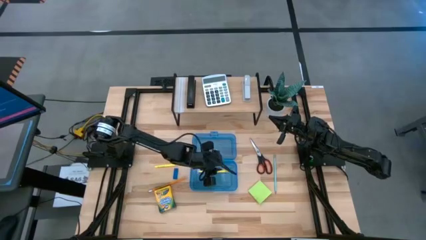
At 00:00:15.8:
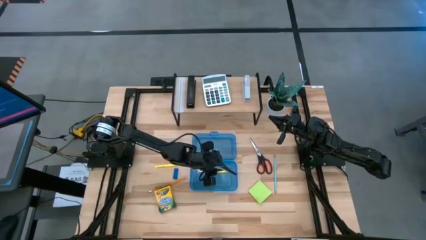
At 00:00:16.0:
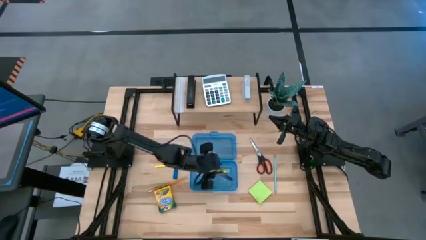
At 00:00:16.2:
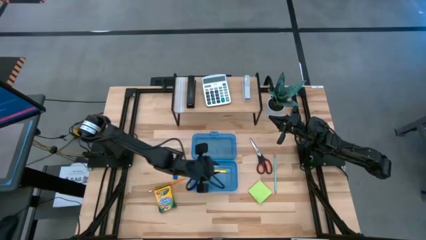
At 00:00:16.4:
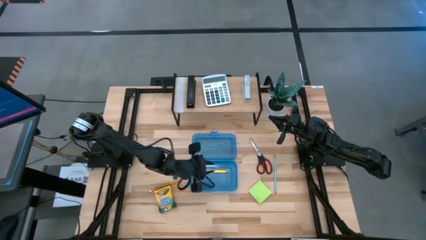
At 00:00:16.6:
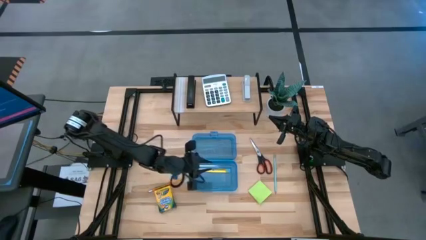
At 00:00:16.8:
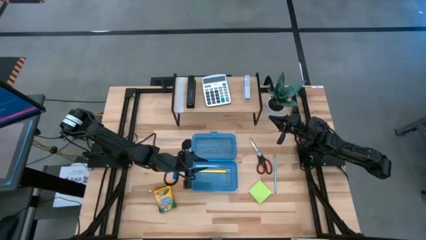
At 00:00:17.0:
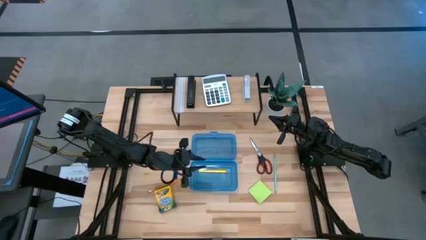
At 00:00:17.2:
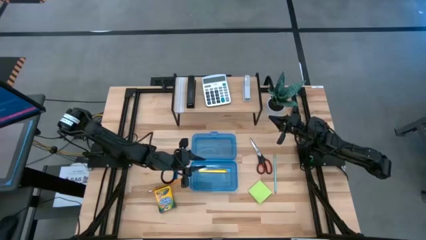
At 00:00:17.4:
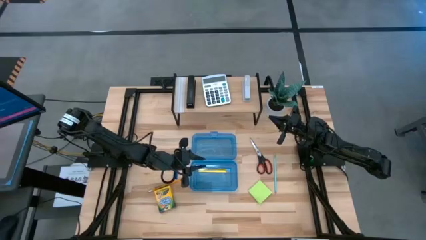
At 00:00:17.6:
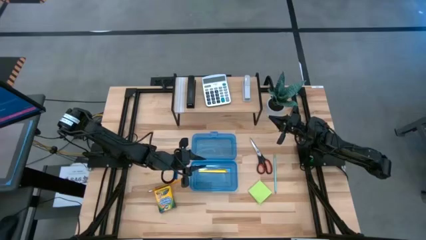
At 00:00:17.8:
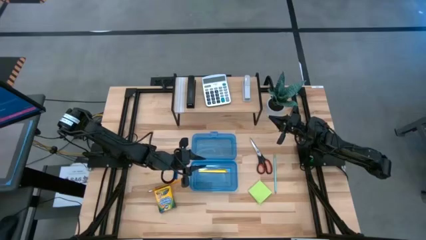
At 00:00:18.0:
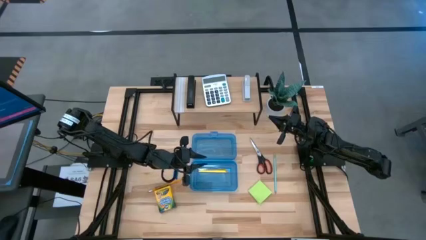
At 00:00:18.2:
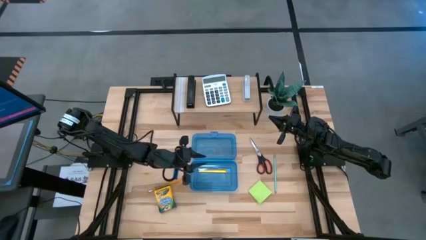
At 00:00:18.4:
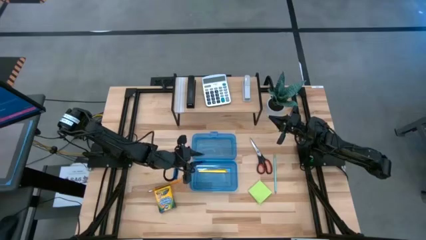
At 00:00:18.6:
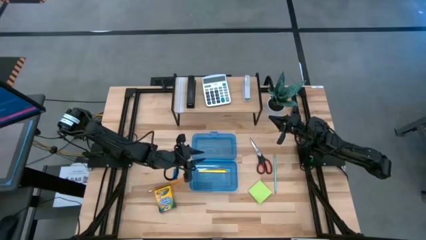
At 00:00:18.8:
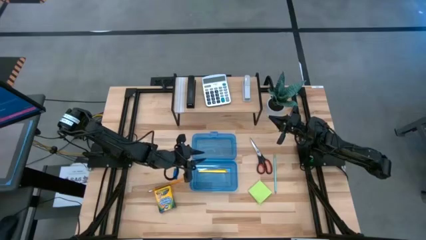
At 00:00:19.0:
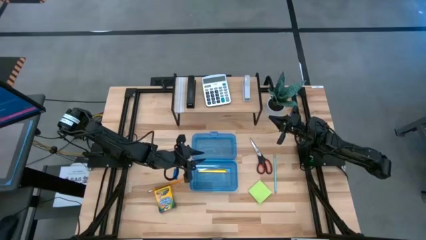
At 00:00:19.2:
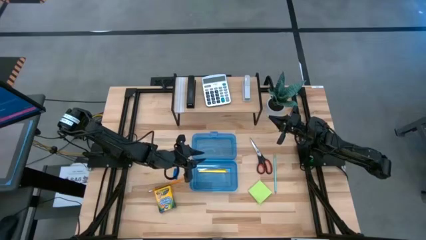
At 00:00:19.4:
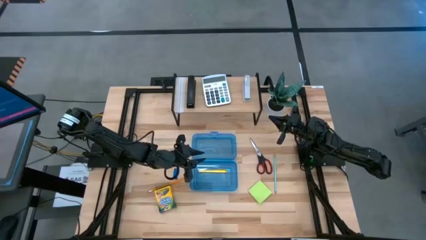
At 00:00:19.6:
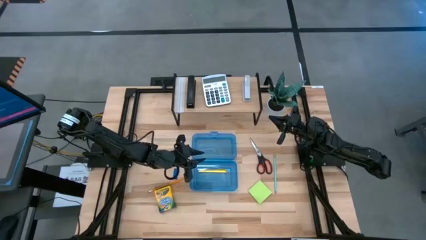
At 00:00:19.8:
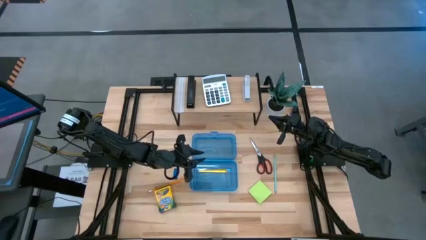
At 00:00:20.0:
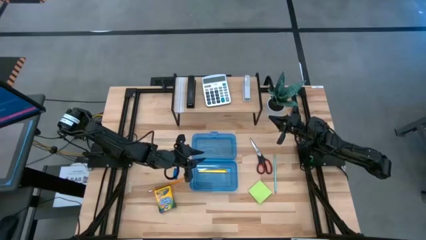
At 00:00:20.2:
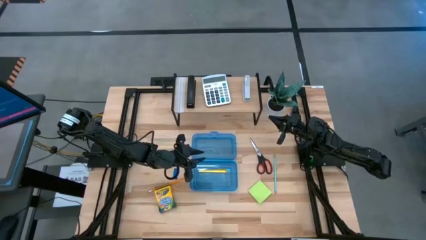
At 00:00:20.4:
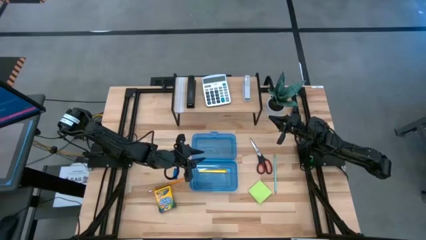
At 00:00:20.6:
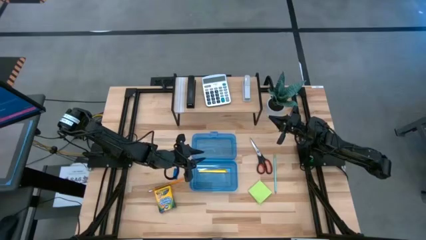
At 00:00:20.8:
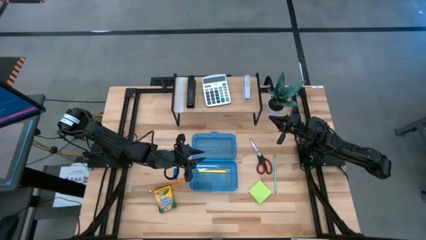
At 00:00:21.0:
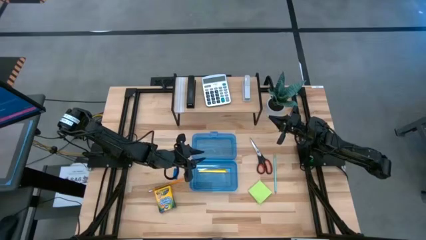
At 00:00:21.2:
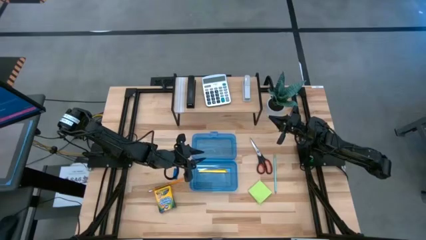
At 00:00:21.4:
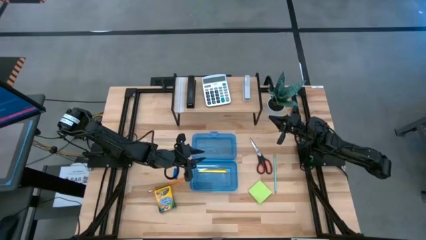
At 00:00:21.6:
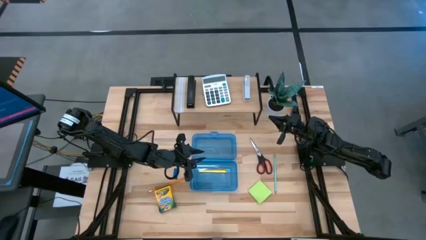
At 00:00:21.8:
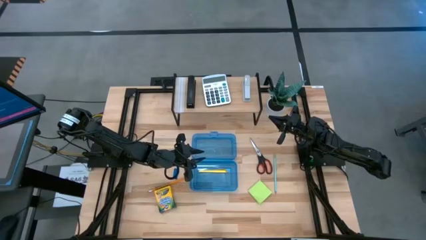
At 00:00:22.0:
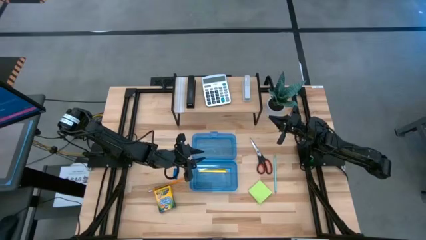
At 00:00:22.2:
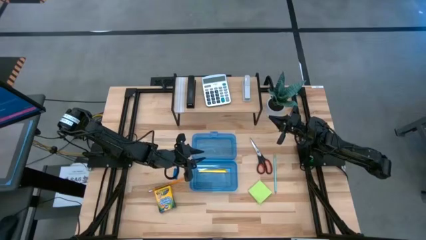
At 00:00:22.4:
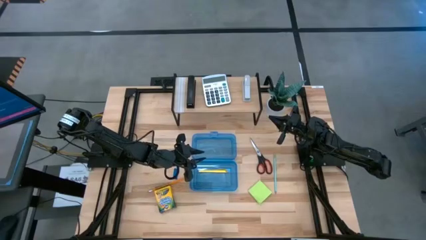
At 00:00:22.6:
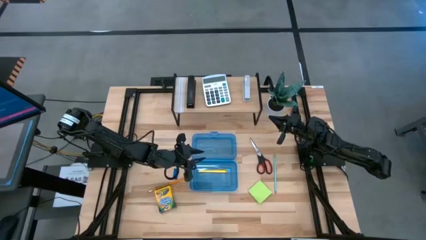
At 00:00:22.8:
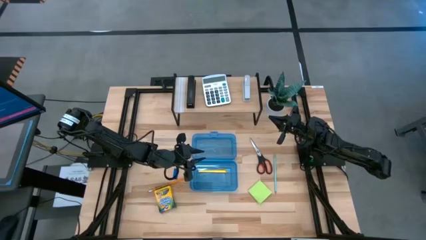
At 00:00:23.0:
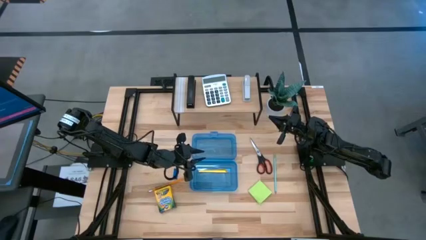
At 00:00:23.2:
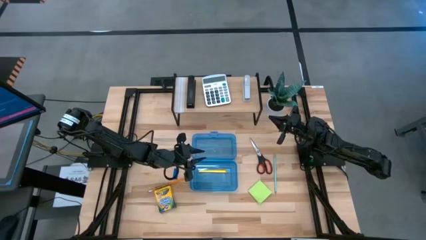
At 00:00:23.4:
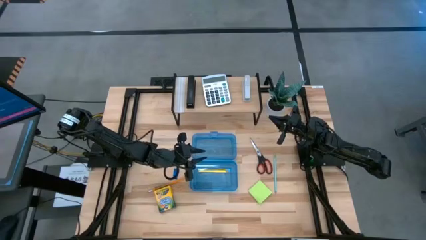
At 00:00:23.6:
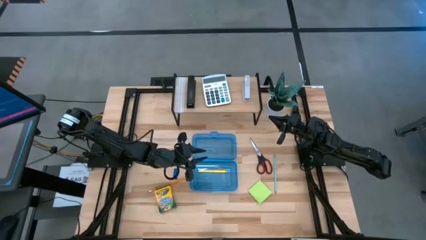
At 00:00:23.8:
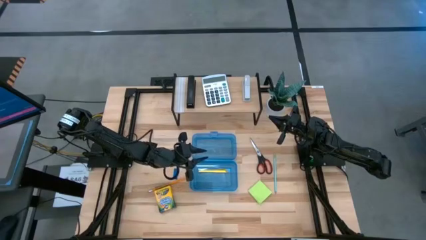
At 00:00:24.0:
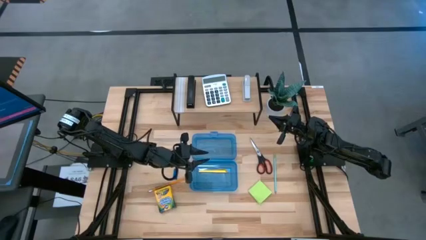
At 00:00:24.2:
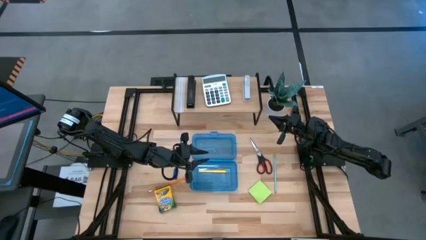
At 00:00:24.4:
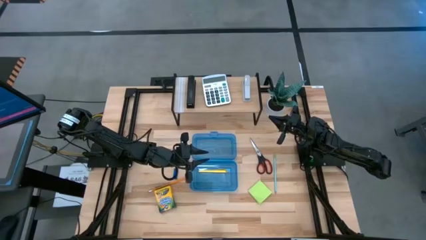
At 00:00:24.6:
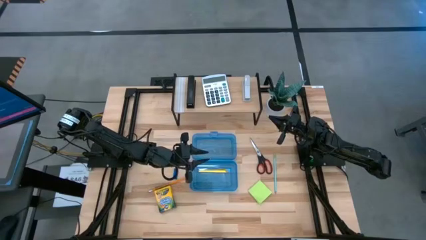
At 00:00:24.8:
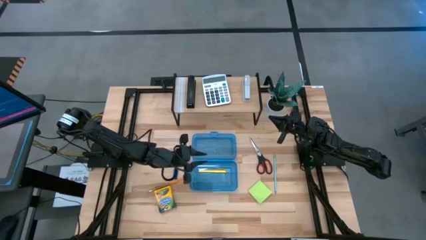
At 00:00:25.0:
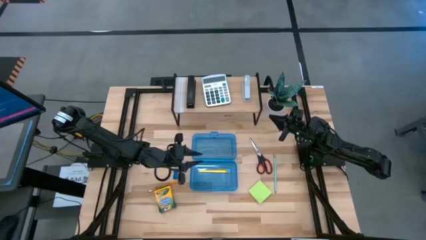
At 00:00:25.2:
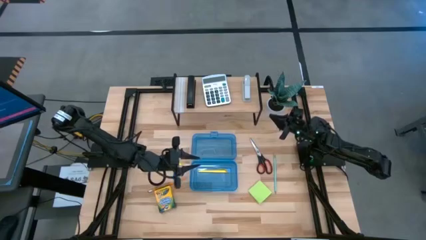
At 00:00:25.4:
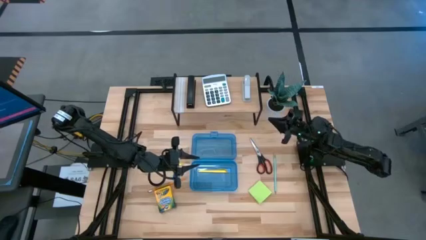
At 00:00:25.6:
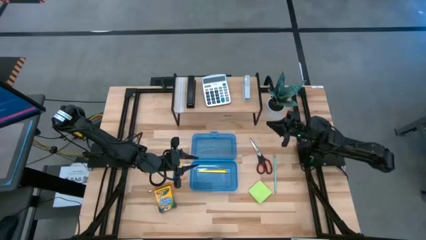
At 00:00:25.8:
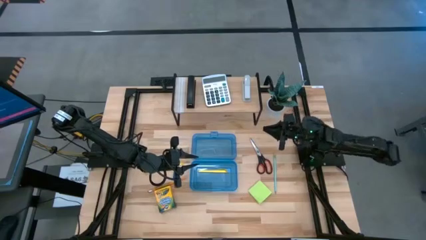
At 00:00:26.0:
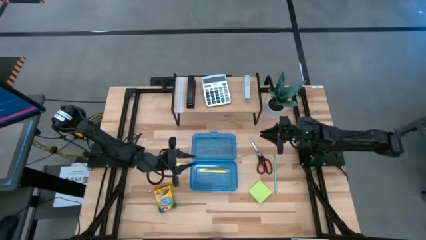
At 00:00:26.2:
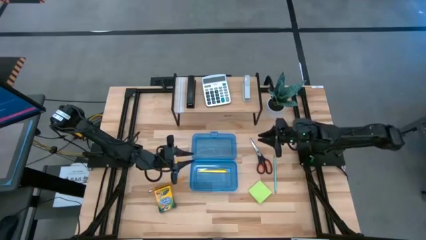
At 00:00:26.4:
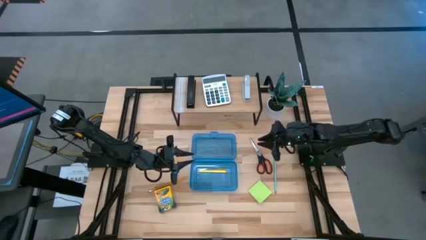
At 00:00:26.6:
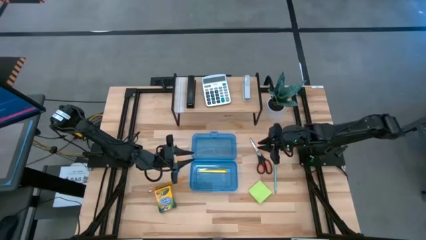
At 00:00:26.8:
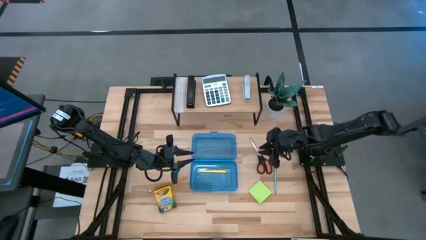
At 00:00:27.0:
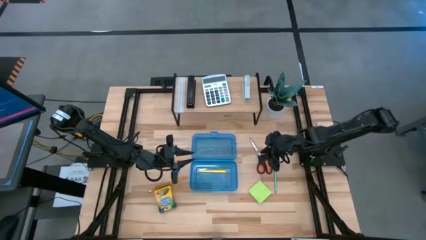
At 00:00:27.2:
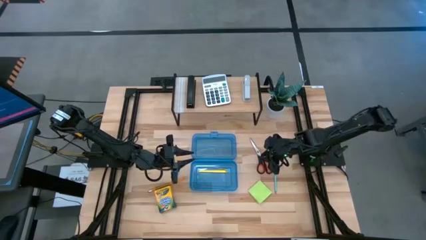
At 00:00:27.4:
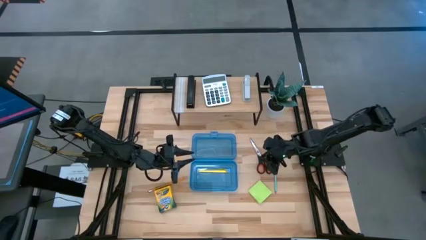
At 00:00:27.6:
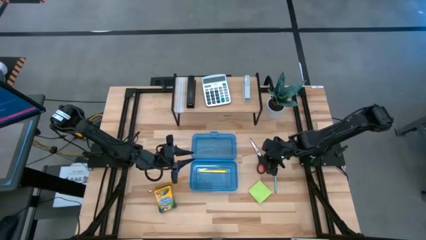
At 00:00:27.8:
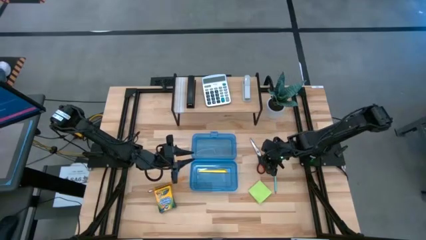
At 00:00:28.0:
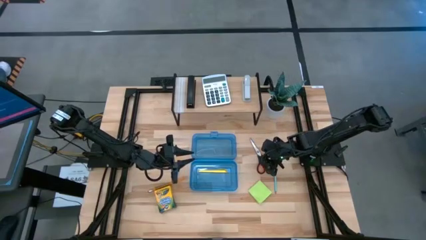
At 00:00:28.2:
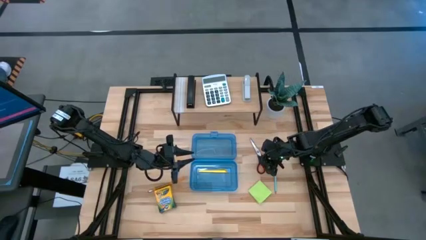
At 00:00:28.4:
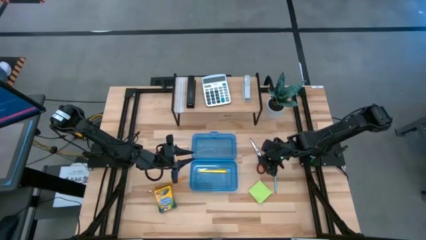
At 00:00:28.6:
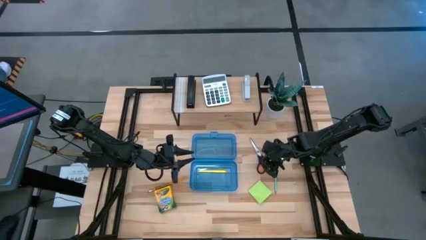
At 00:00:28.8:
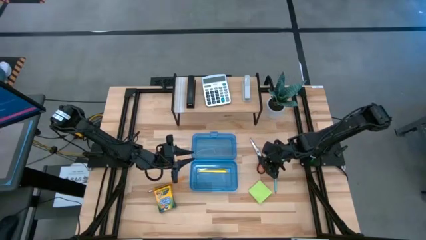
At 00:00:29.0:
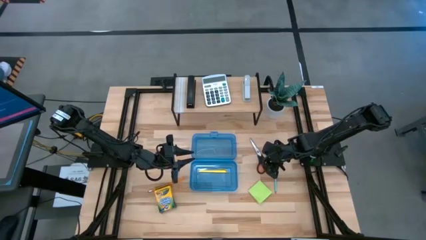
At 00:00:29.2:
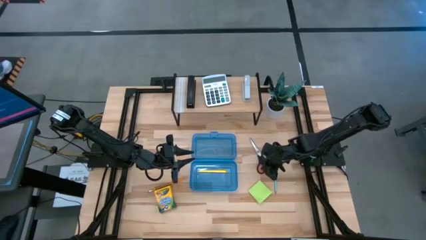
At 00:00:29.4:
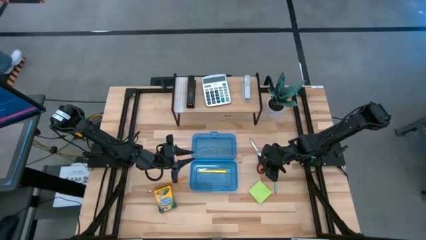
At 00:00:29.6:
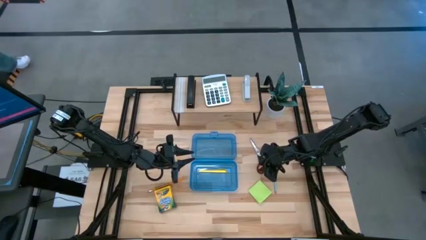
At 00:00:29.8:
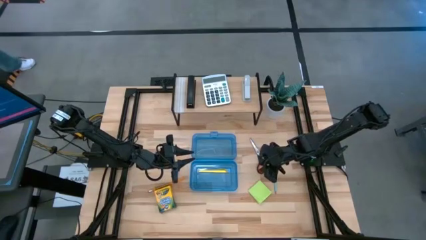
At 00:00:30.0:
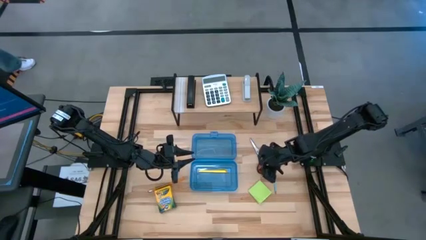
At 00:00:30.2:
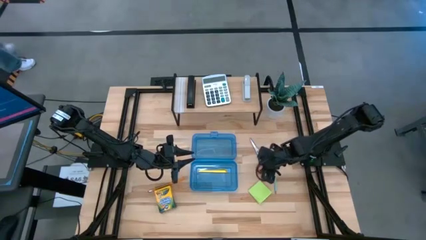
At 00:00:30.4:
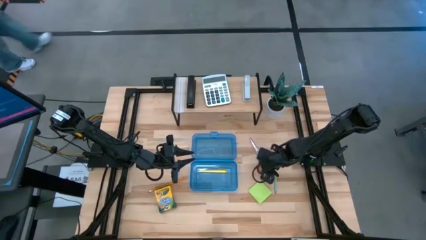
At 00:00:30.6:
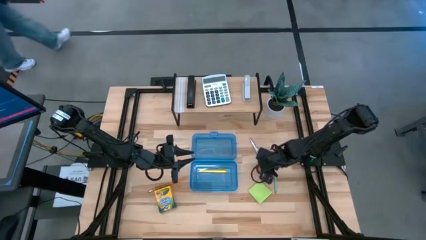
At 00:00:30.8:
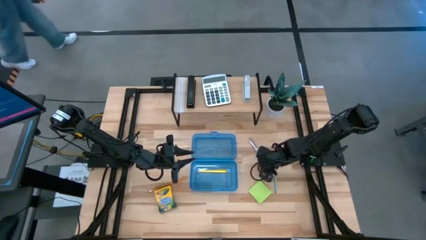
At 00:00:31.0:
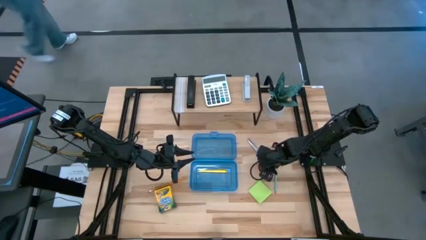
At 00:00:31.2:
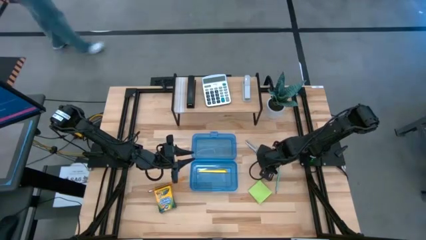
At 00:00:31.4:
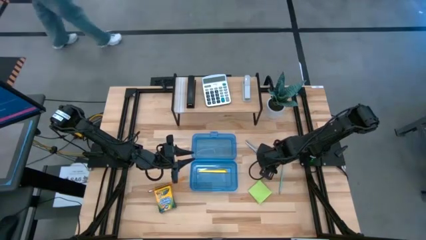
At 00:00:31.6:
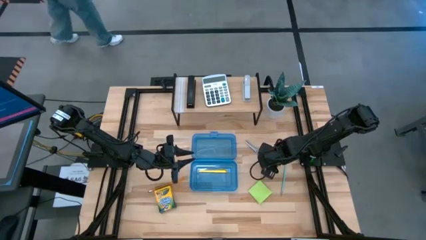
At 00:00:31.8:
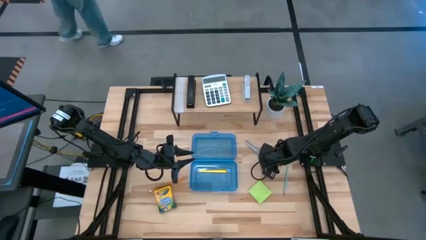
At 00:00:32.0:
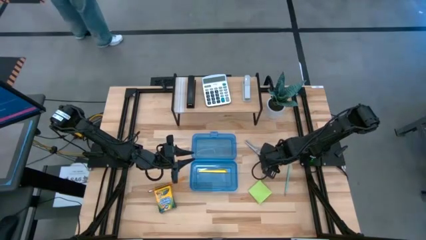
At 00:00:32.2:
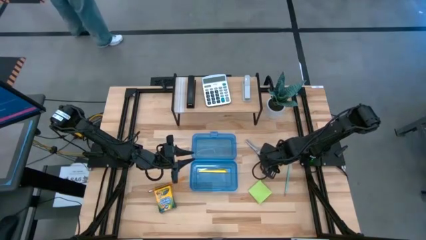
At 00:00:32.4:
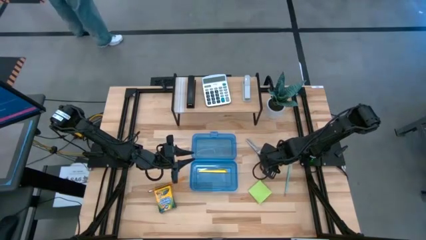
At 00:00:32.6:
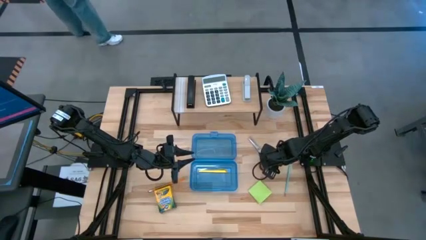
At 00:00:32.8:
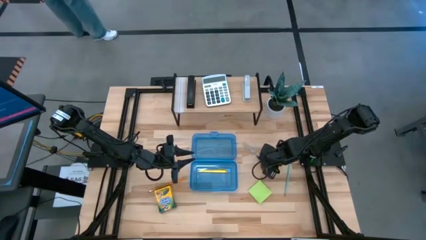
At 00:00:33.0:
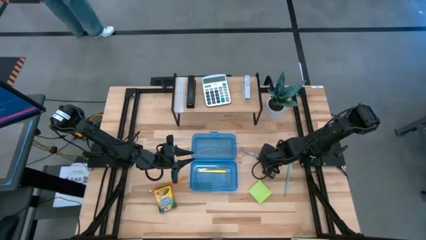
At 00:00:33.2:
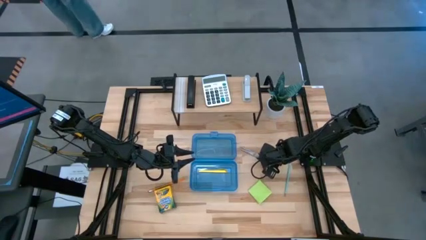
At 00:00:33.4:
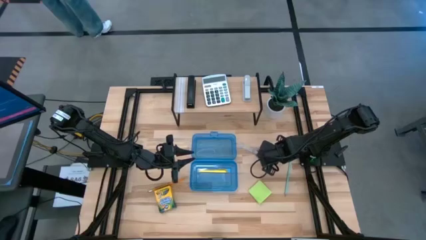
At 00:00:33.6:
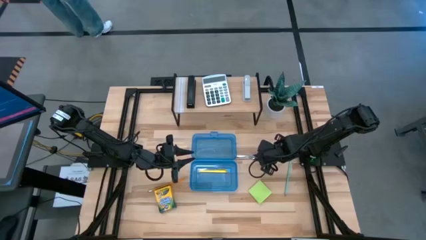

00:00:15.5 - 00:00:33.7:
Task: Pack school essentials
Put the black scissors into the blue supply box
